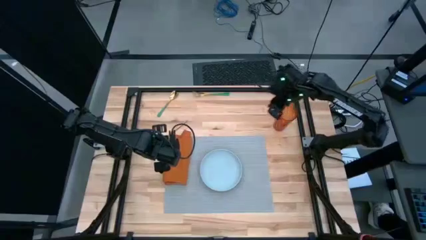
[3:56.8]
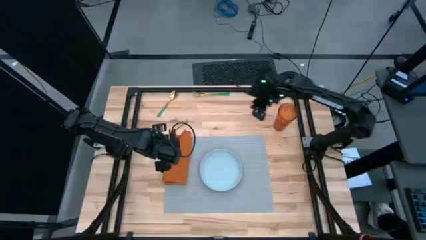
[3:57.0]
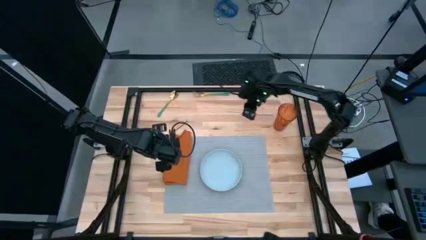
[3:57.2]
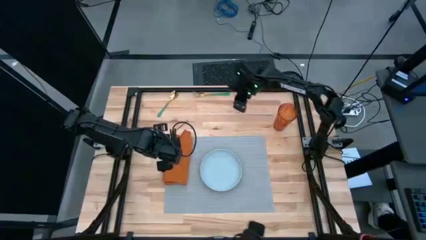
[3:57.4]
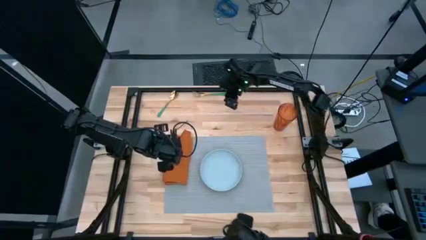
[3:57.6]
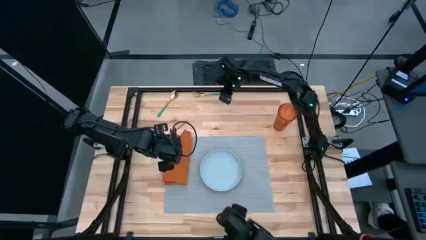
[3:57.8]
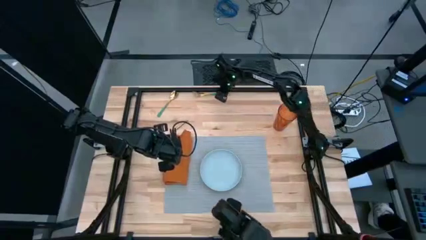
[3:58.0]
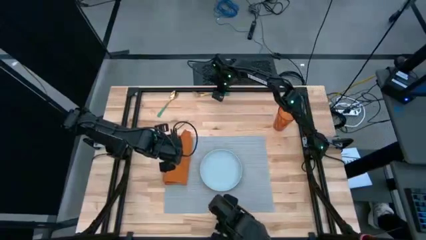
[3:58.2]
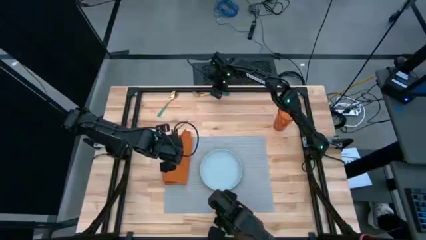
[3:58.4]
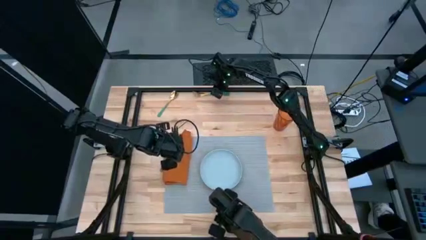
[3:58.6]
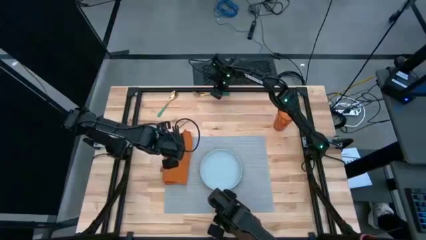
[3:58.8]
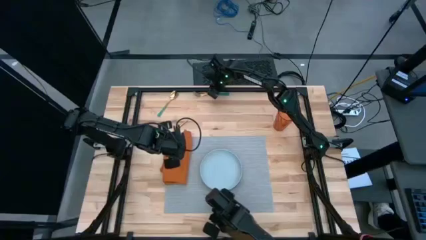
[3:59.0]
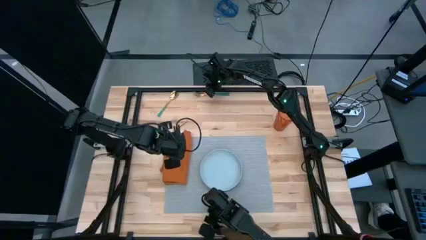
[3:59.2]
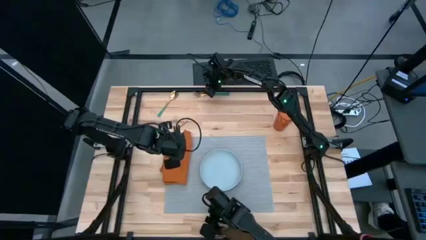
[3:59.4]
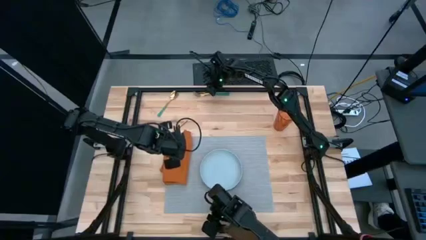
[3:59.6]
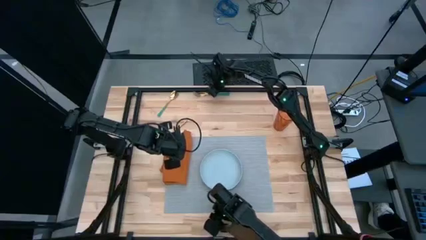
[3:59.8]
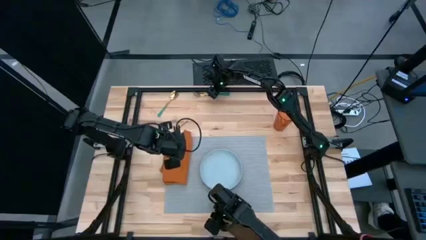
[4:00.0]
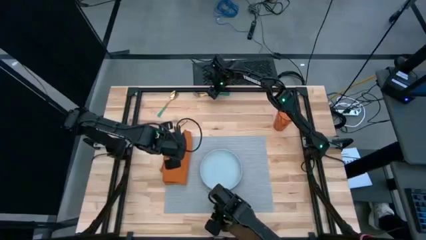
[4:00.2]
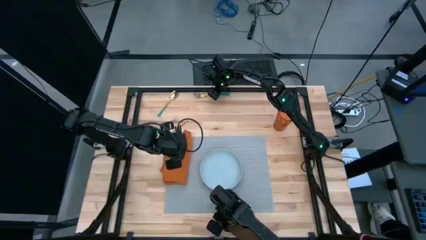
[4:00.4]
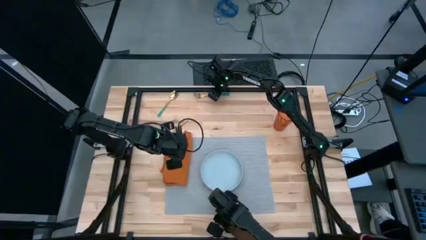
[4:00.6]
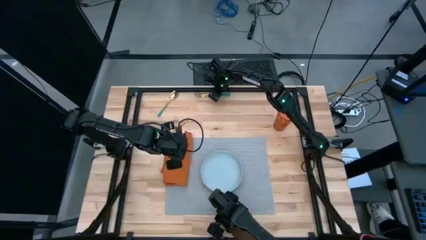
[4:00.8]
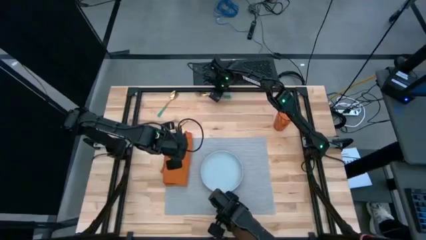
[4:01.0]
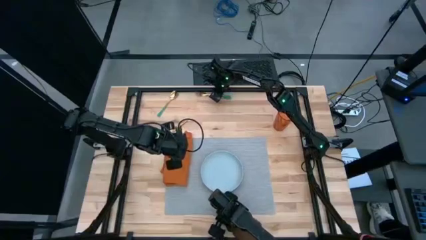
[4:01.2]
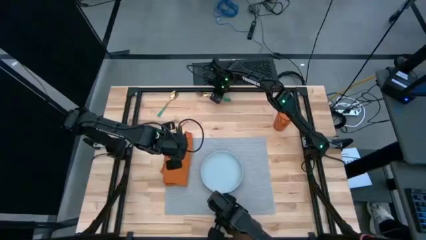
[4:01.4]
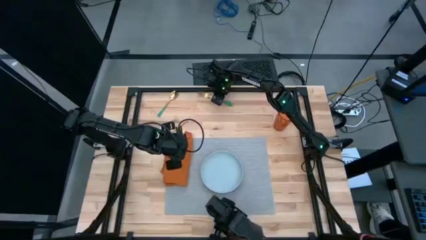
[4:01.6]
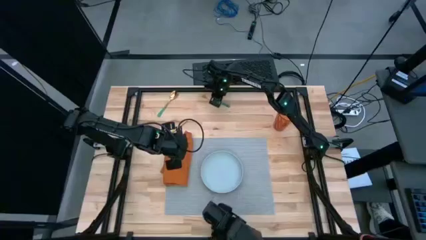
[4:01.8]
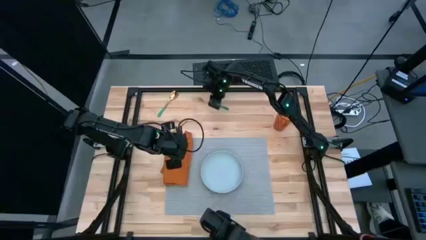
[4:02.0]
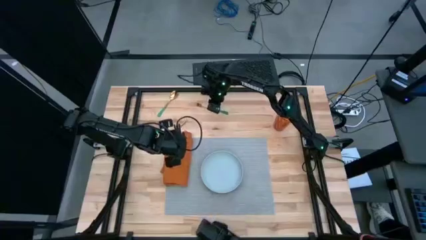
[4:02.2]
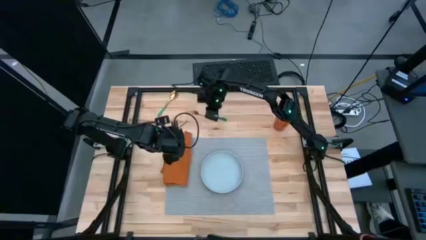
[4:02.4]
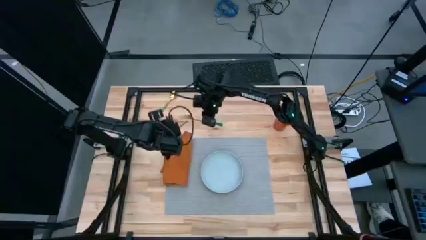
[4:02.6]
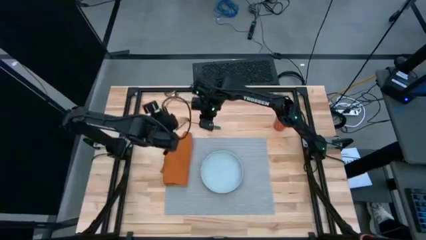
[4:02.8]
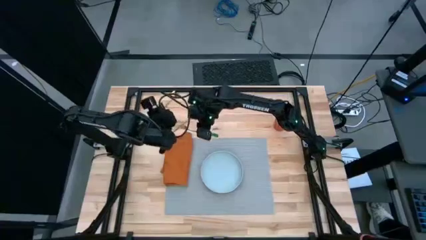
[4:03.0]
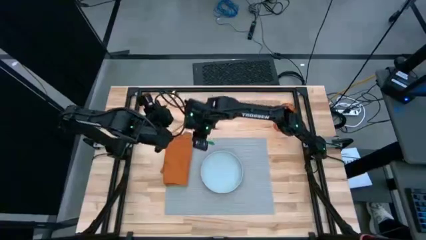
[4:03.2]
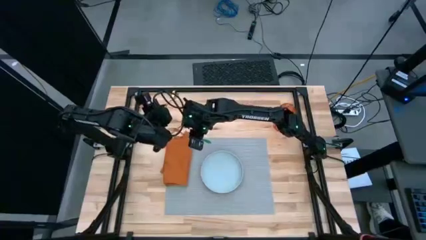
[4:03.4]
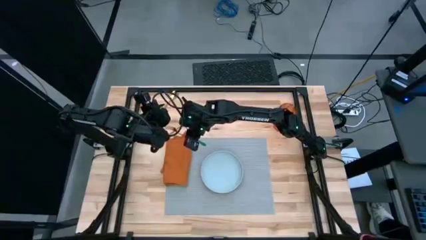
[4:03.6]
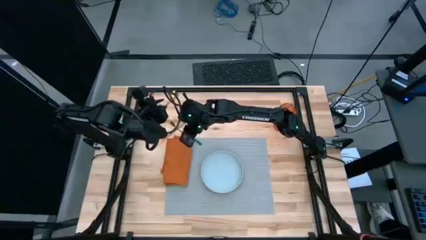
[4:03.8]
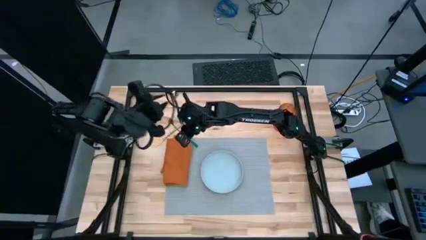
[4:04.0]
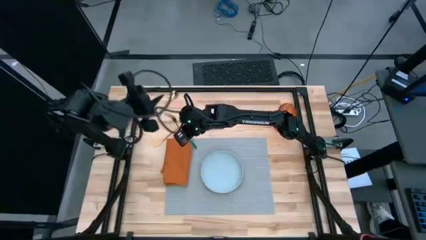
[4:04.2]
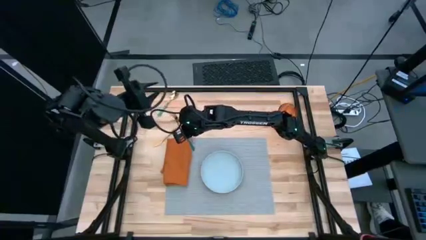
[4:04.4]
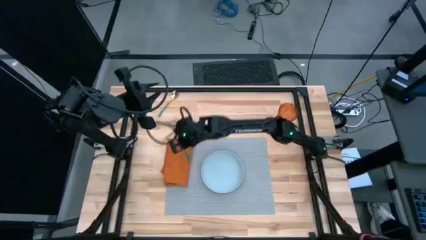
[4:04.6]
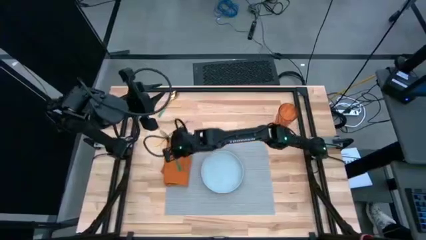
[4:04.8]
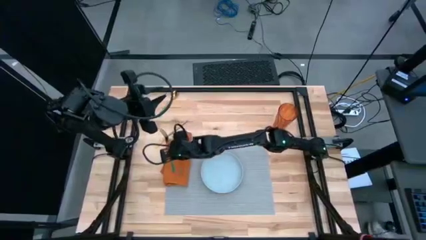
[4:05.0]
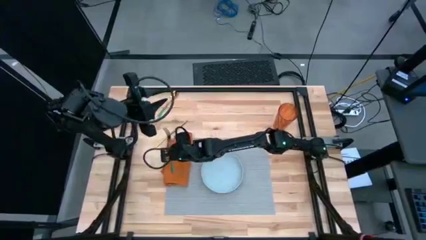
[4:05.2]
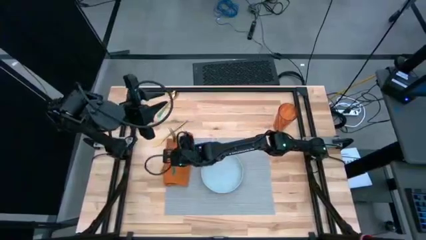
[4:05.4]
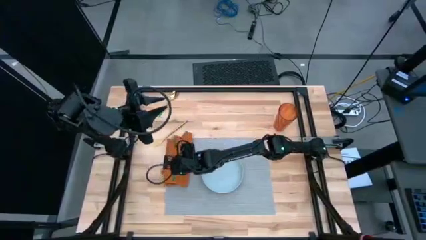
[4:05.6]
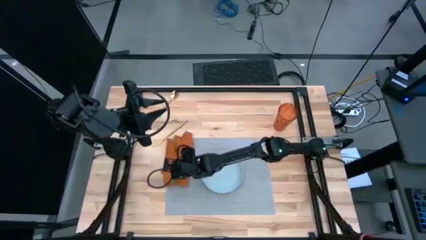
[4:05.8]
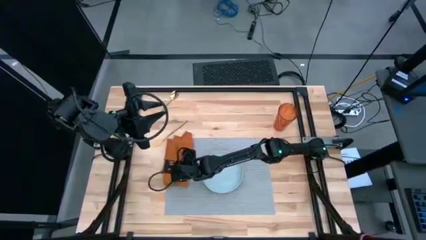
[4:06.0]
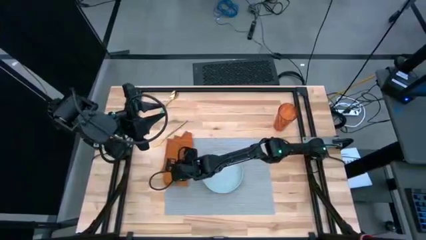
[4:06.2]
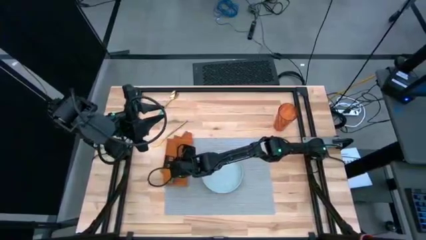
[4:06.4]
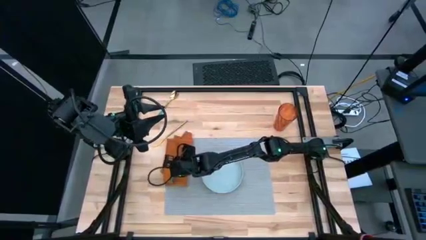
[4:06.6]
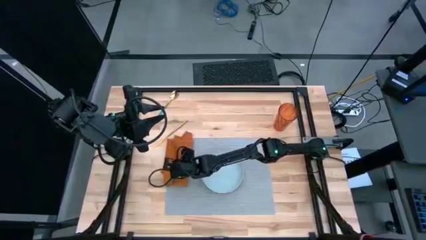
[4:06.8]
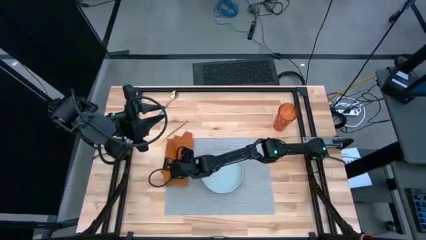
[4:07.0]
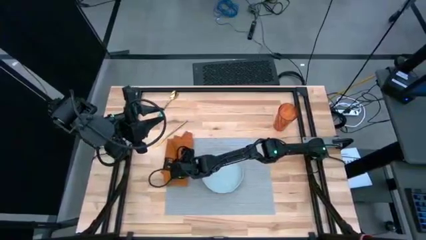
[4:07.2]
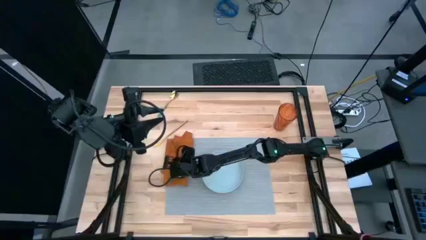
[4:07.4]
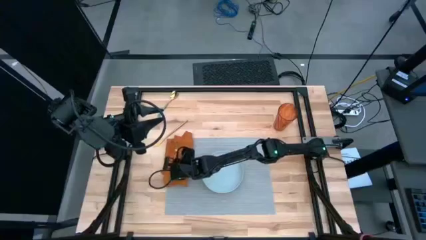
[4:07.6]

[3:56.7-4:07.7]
Task: Set table place
Put the green fork on top of the orange table napkin

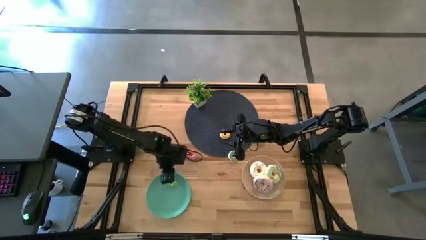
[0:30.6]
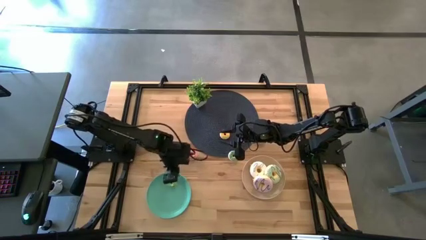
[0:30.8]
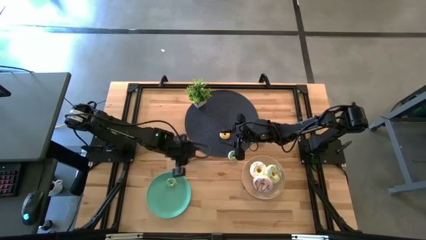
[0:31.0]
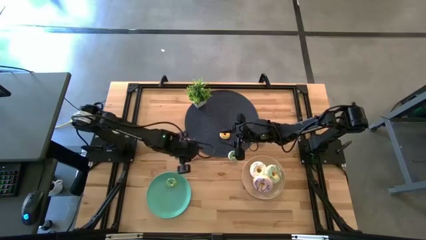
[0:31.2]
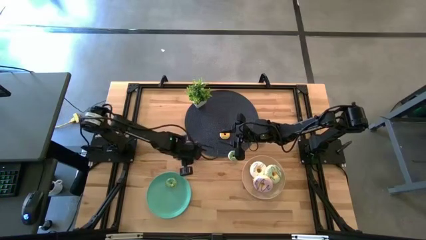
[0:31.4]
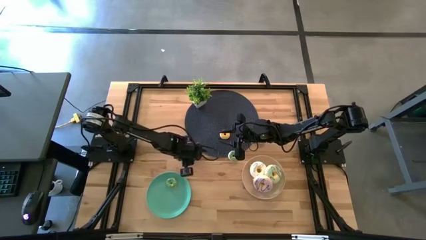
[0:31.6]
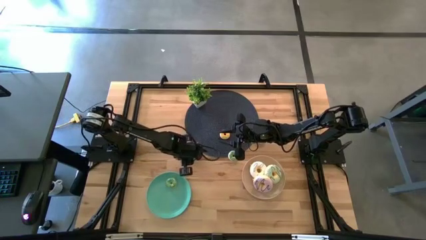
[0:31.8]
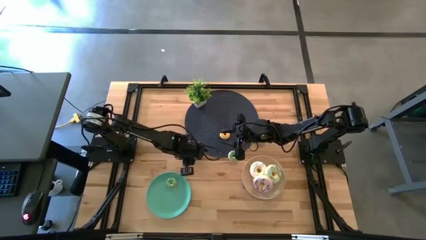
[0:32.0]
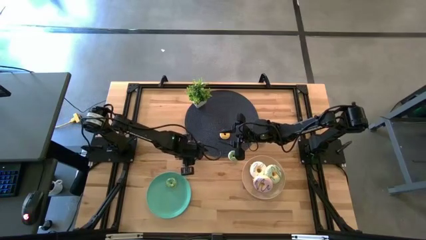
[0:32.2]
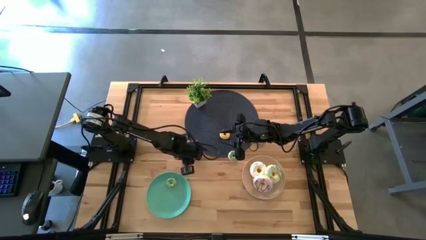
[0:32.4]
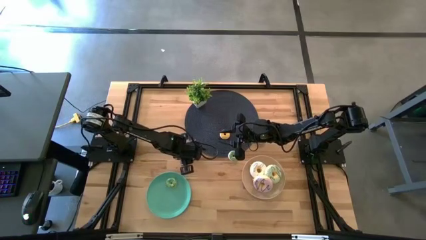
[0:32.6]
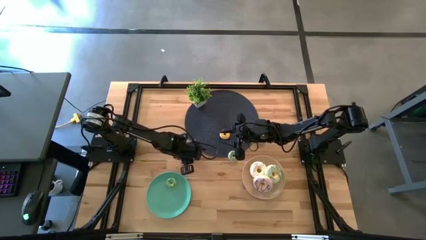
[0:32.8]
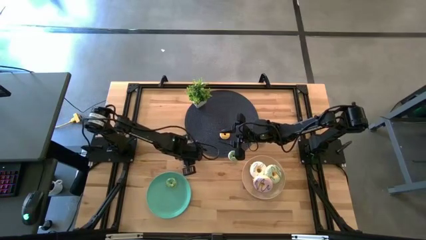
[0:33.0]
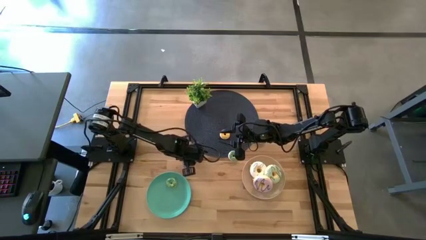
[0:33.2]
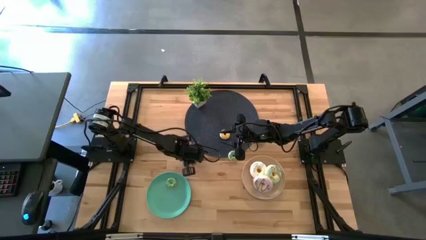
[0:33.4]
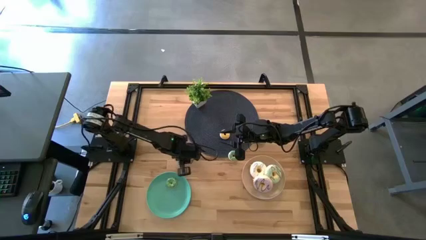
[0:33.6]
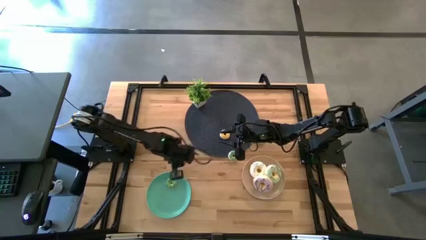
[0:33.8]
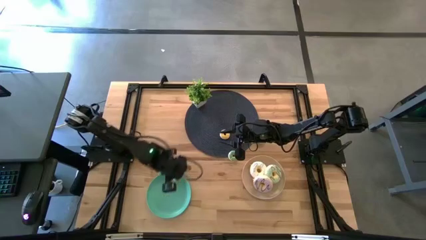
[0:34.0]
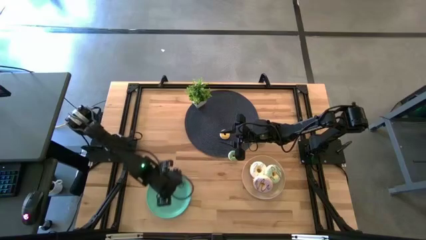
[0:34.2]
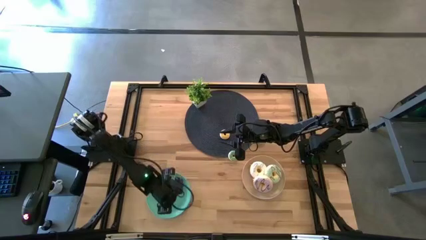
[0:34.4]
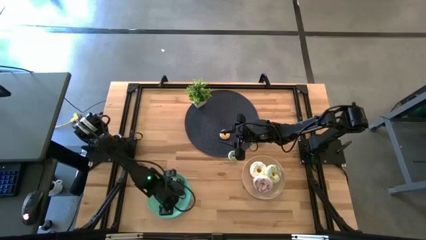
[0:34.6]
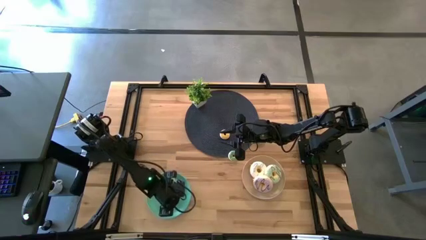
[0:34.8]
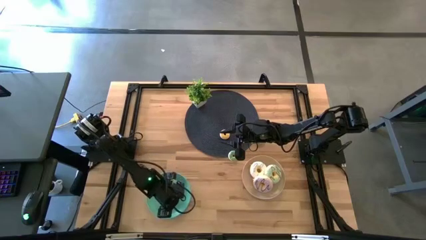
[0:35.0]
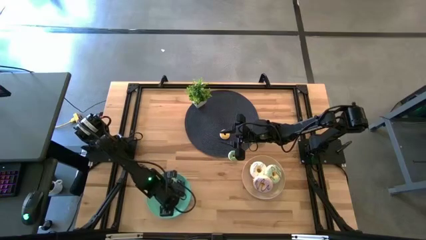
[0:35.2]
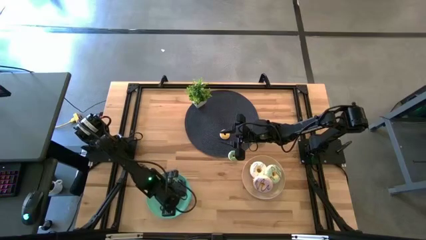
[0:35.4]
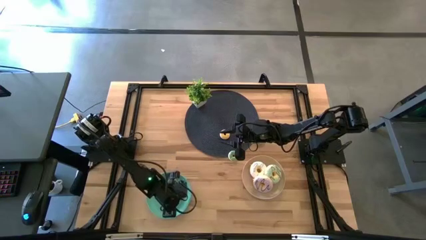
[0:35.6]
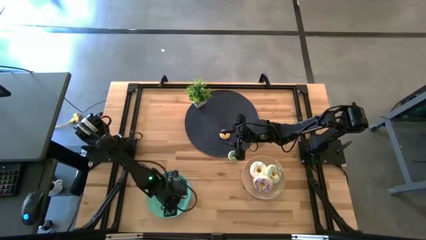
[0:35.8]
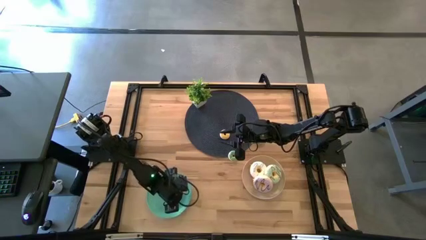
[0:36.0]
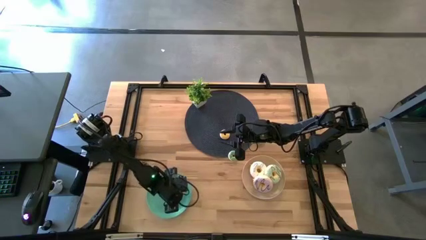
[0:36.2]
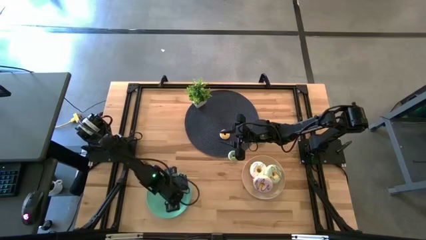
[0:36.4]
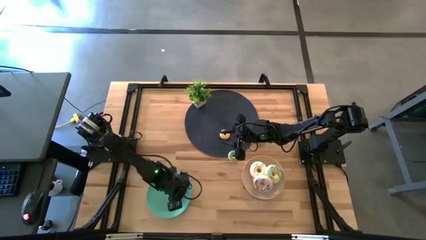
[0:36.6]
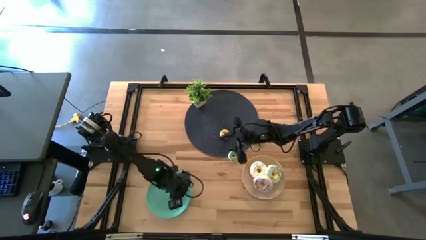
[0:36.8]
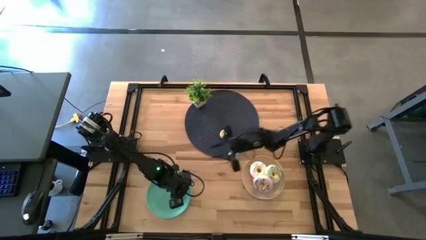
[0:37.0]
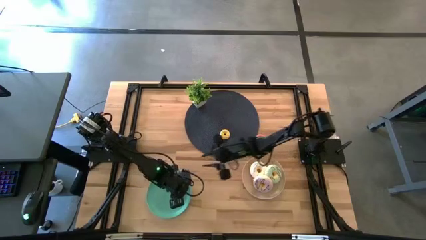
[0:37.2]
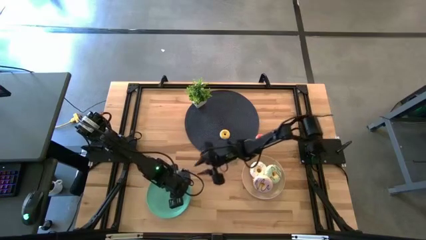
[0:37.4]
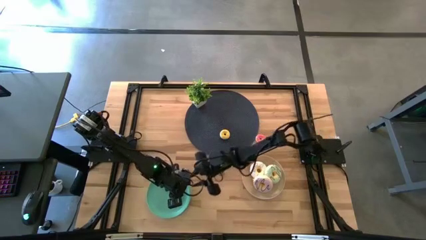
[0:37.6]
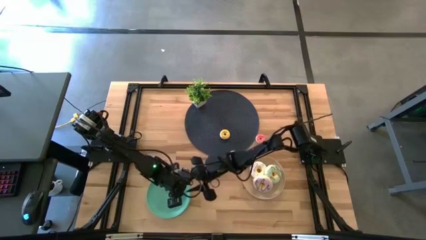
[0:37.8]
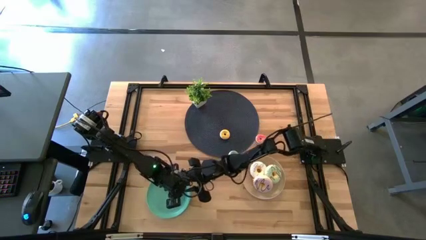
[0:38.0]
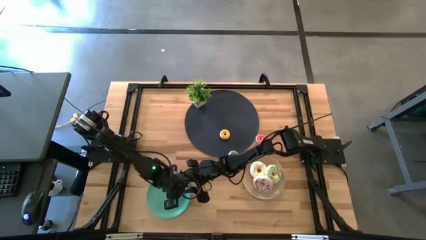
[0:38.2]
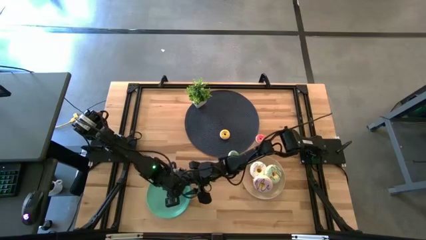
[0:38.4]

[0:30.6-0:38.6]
Task: Pick & Place donuts
Put the left small pink donut on the blue plate
